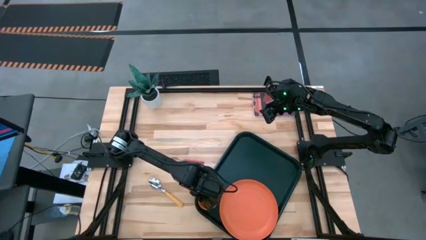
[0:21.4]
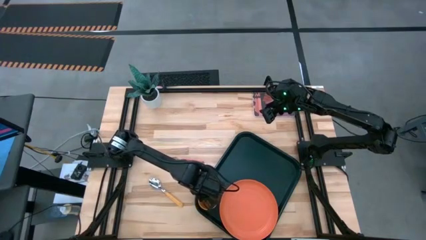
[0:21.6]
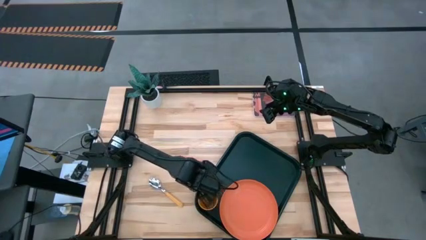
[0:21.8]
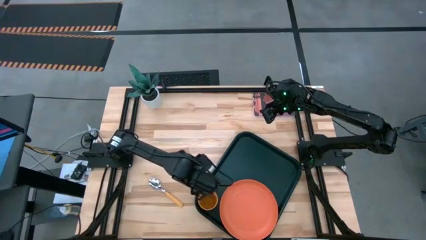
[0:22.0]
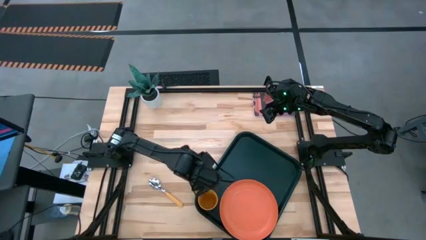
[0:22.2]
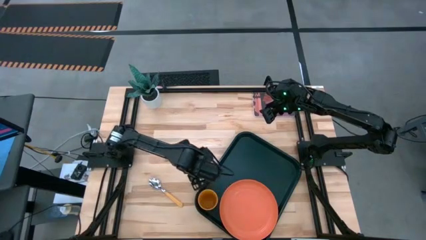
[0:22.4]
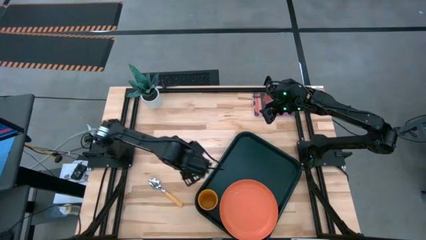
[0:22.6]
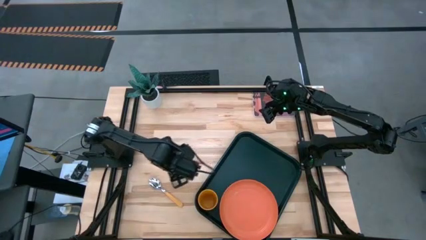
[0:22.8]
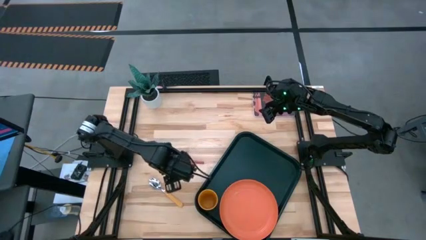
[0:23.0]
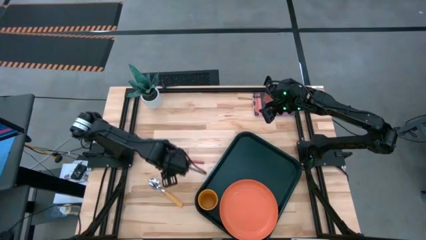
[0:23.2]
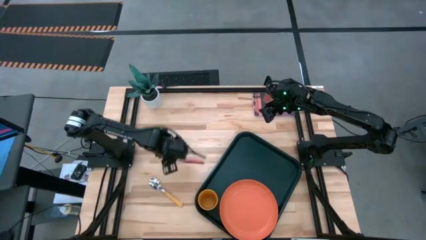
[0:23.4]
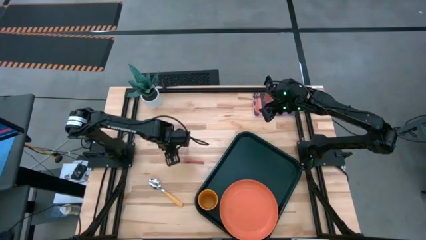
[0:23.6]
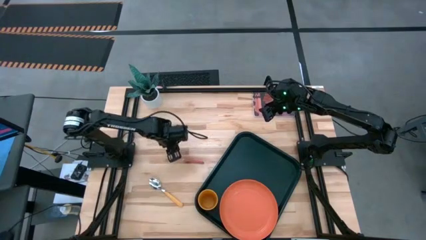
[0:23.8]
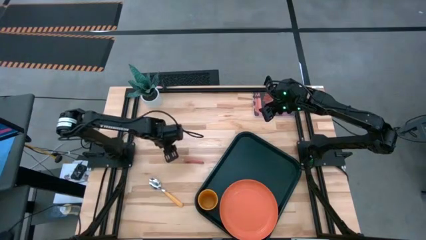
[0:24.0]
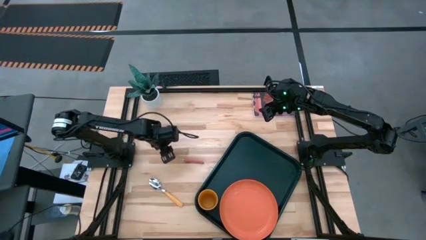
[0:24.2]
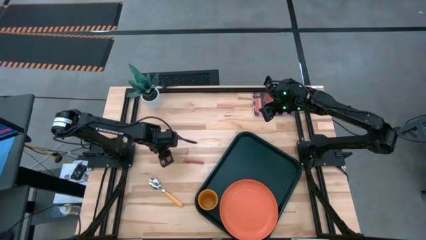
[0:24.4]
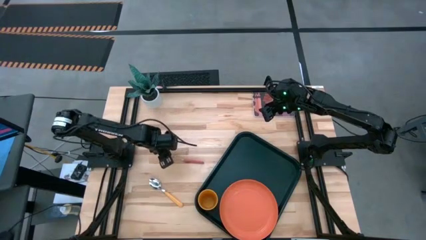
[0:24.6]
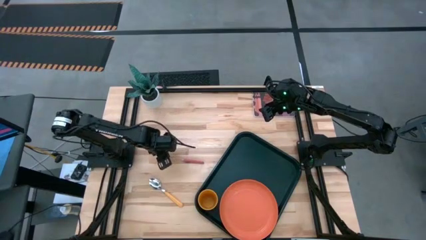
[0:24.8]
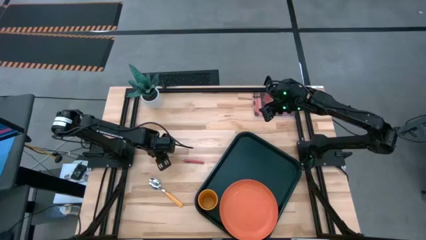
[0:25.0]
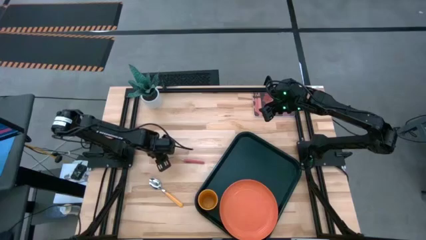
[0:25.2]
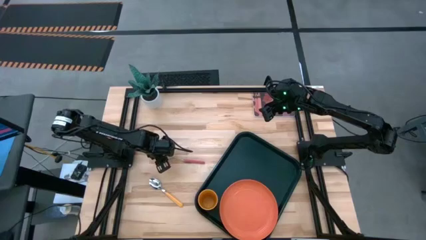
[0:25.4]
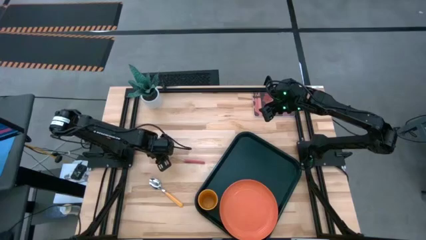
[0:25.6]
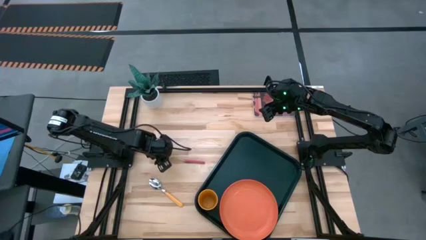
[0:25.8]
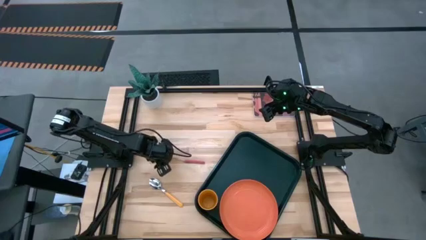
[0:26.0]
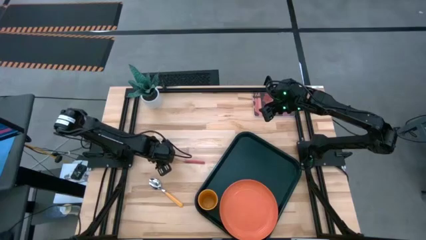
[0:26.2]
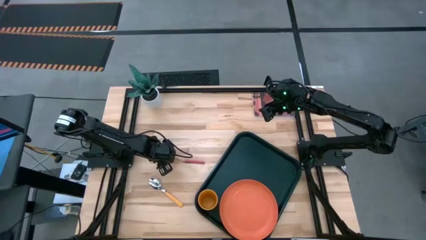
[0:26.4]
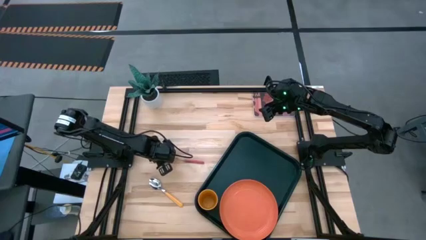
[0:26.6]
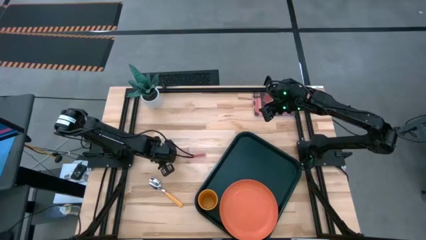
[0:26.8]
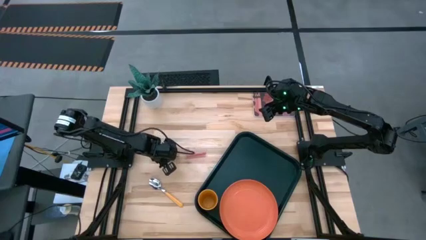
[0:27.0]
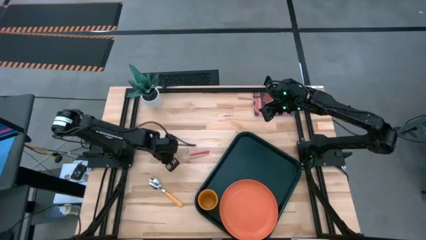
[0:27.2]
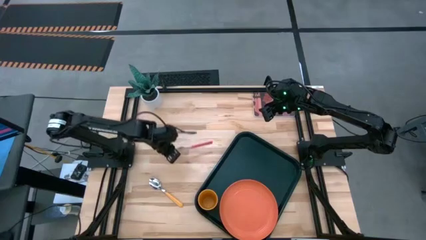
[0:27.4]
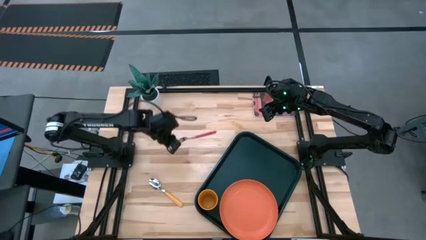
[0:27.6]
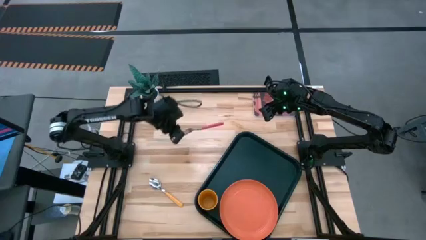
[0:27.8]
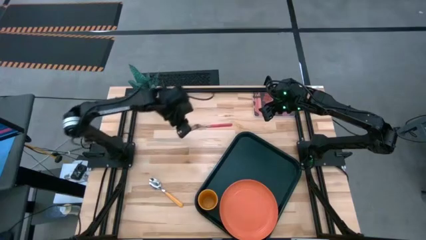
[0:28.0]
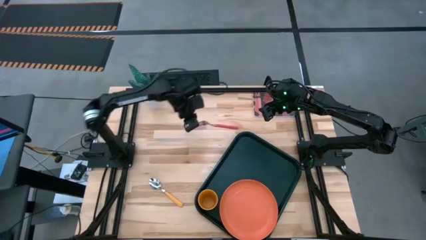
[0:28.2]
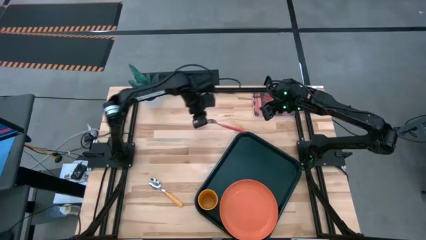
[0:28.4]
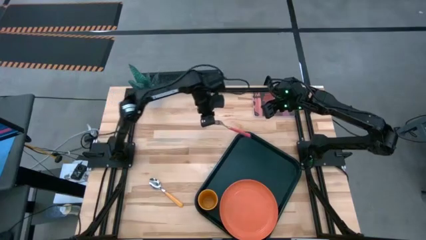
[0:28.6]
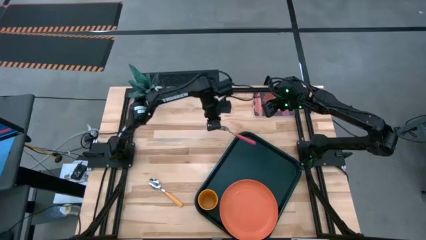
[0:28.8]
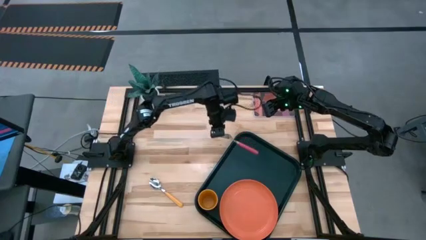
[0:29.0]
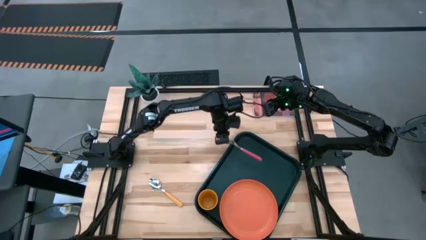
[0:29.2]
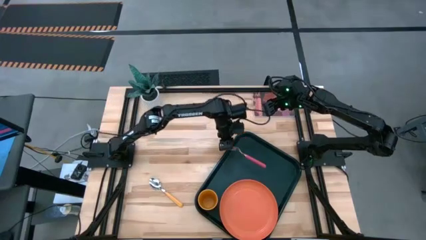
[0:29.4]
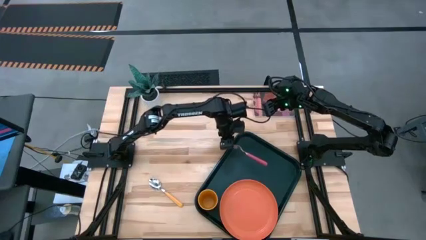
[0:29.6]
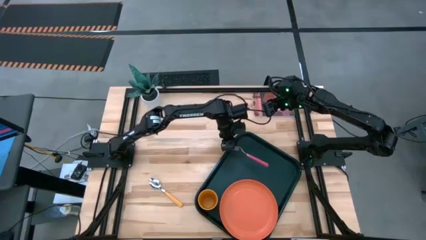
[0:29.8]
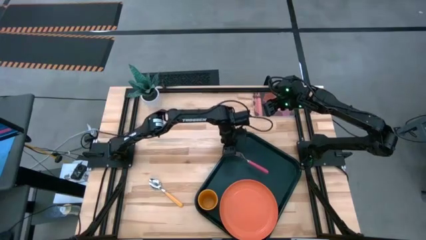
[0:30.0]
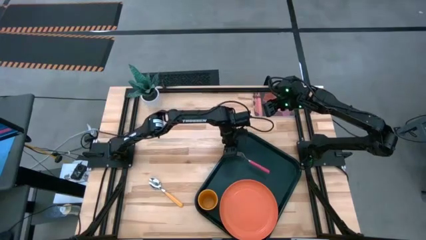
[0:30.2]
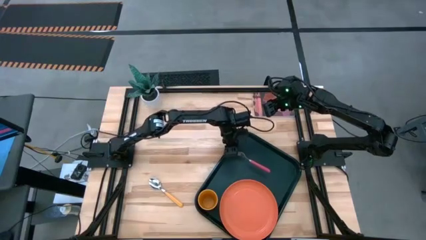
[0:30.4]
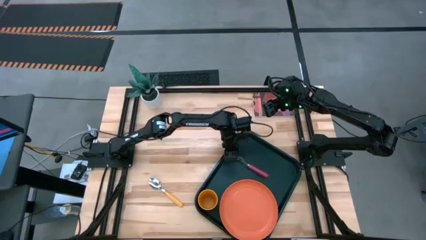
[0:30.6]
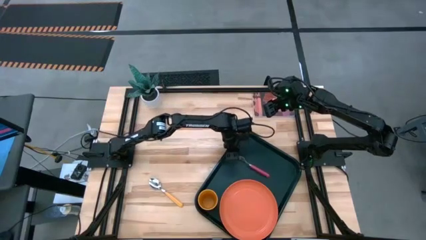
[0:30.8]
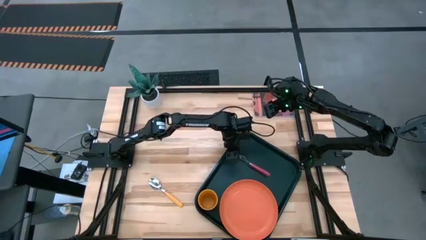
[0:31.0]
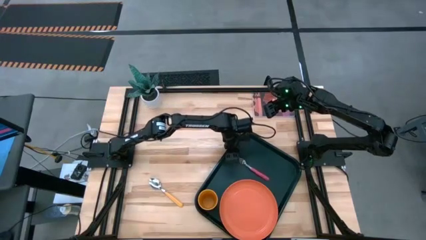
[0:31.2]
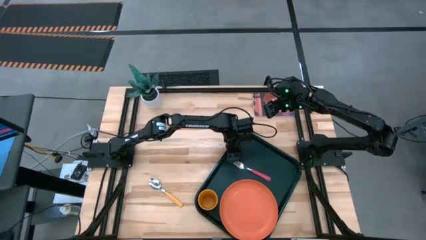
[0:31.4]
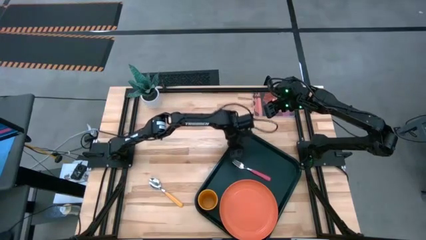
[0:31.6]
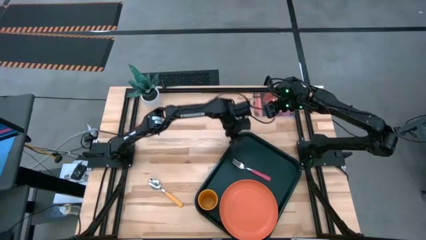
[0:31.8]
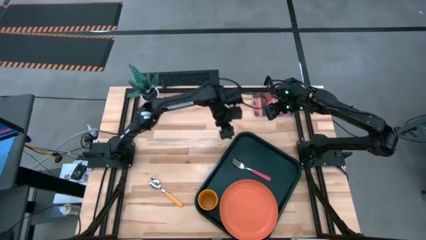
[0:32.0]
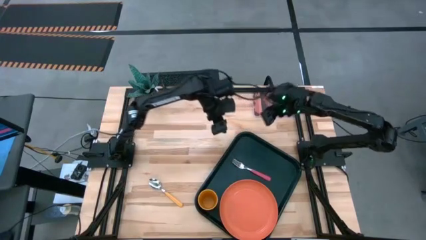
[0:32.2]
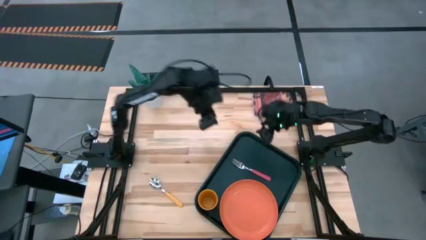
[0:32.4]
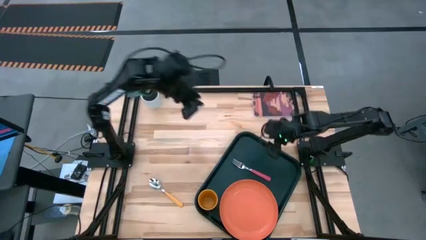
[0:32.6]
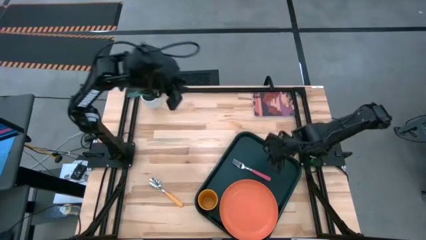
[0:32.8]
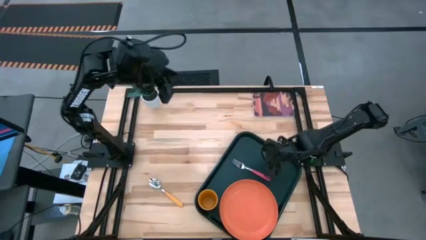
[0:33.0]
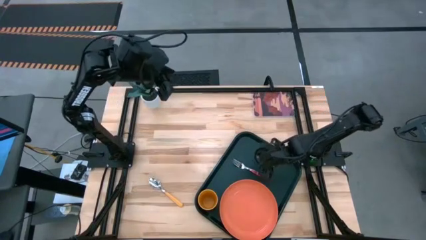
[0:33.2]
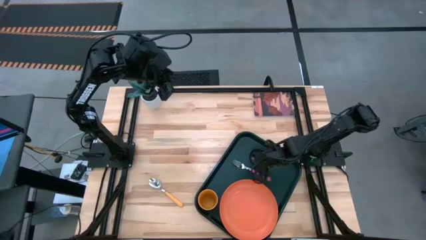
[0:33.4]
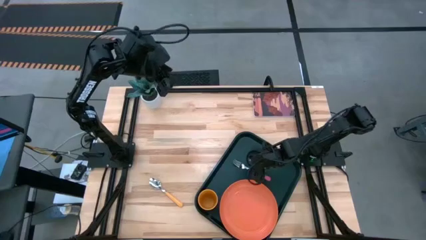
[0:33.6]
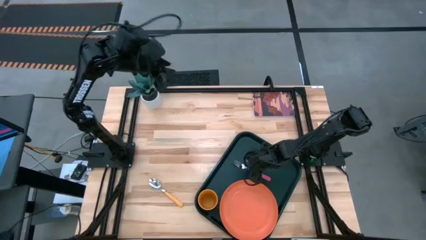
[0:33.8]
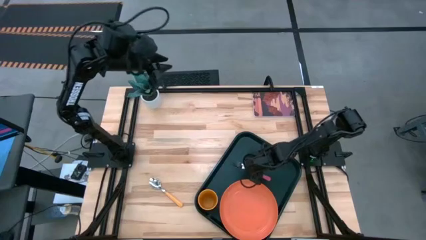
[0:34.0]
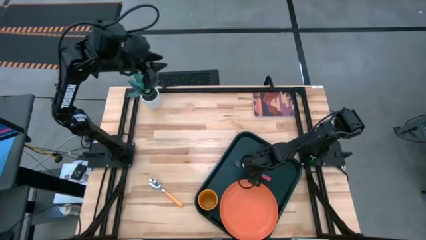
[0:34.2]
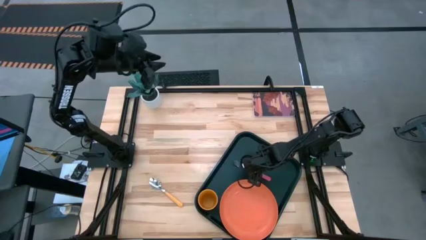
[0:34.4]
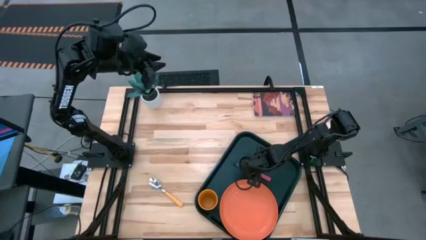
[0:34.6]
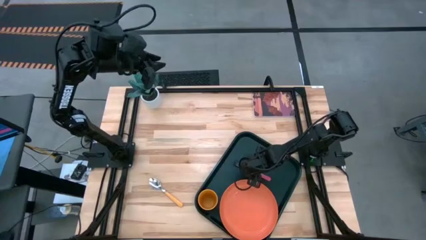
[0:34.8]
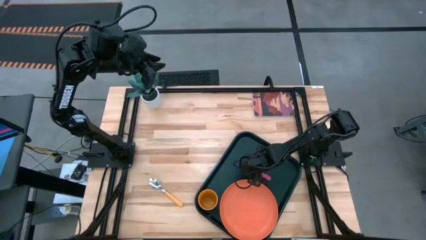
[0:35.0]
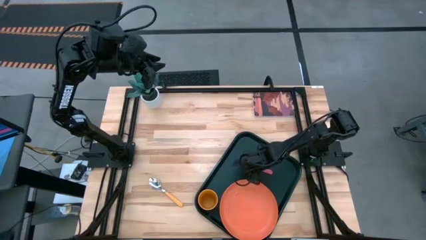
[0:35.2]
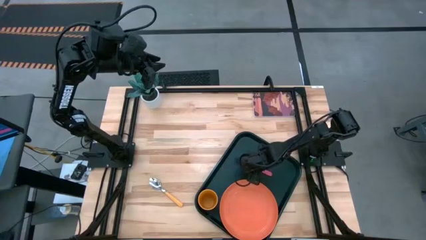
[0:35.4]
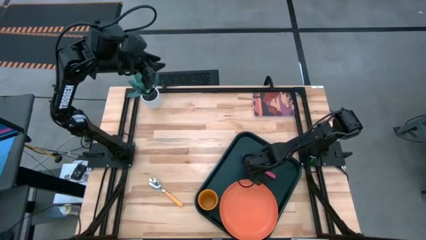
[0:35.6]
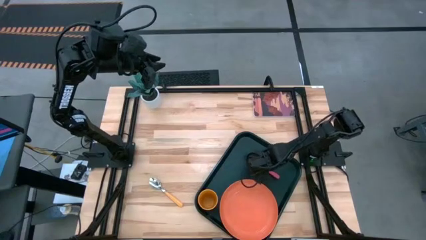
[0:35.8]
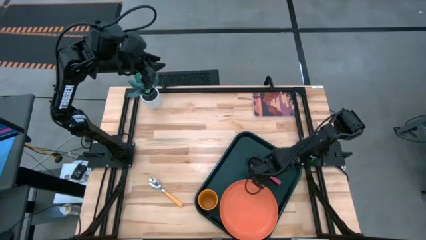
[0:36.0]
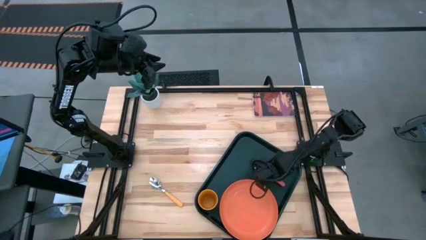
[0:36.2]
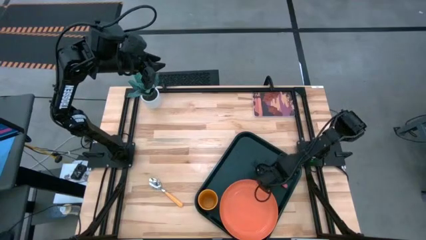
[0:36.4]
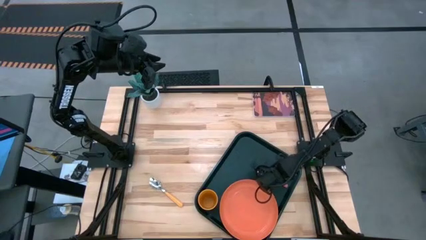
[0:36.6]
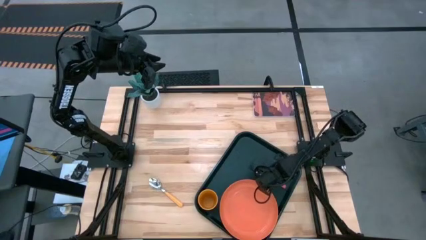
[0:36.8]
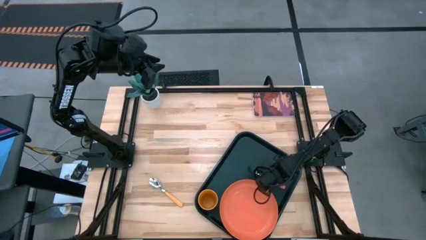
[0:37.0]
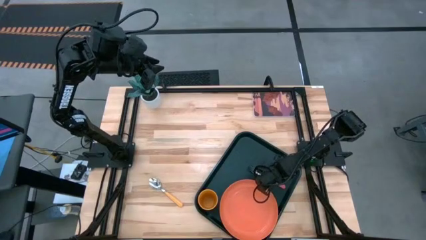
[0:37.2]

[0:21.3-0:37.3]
Task: Pick and place plate/cup/fork/spoon on tray
Put the pink fork on the black serving tray at the top right of the orange plate
